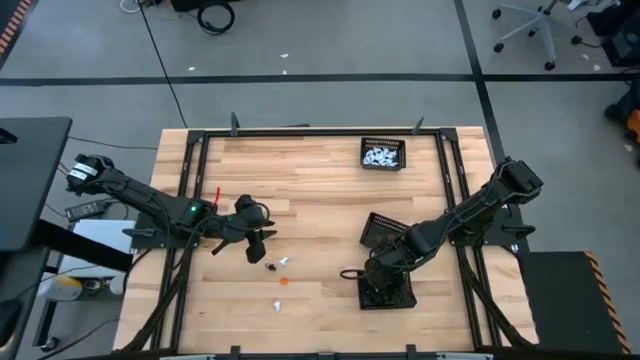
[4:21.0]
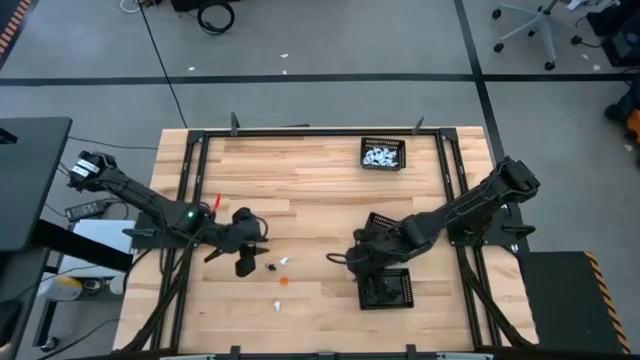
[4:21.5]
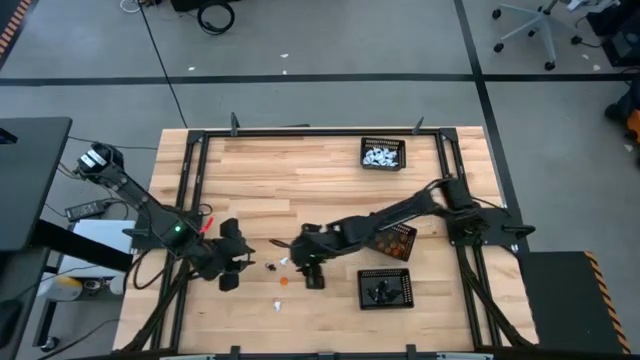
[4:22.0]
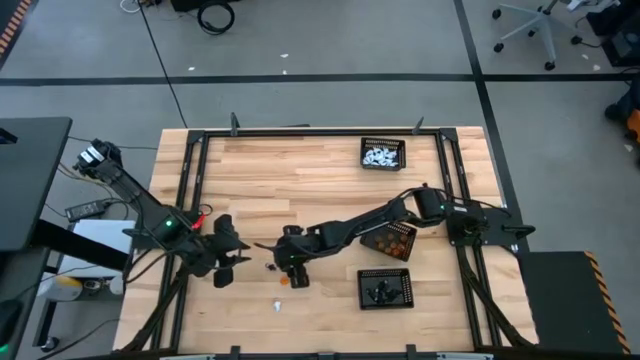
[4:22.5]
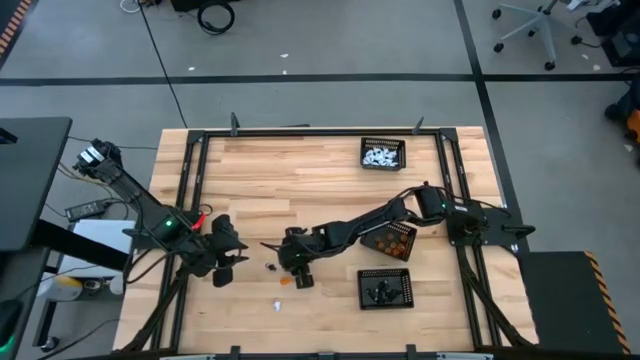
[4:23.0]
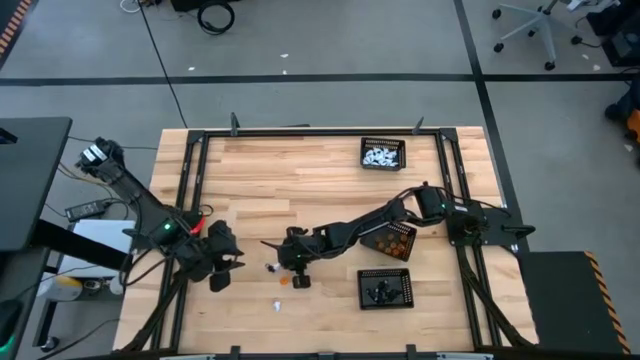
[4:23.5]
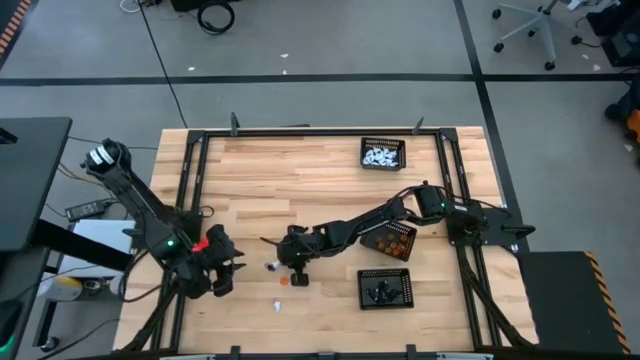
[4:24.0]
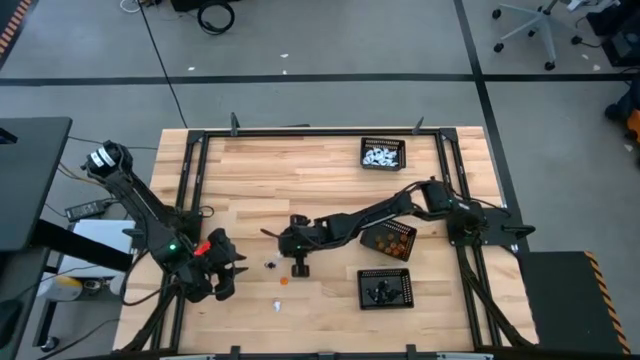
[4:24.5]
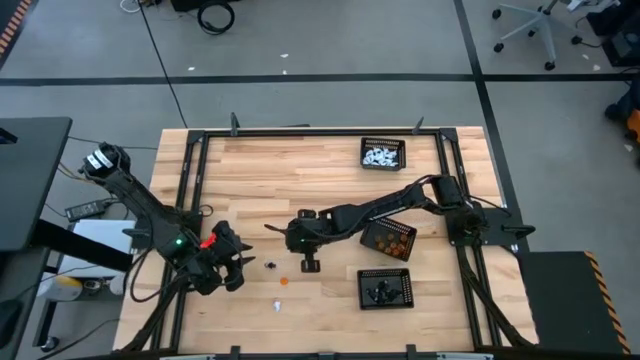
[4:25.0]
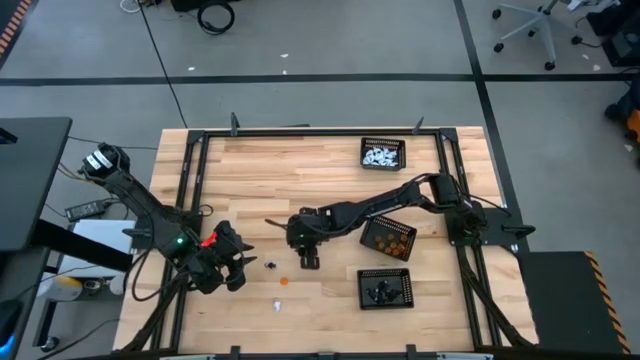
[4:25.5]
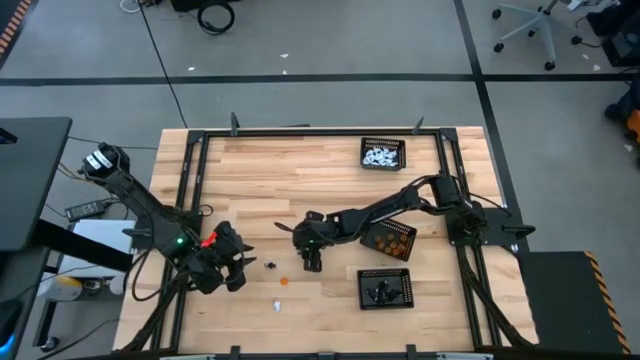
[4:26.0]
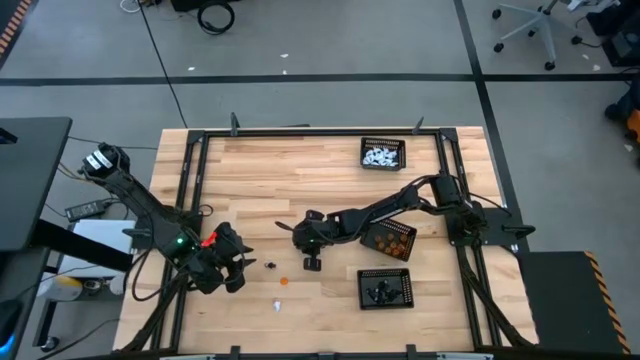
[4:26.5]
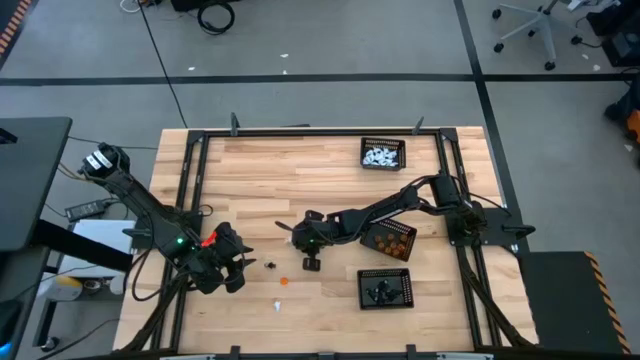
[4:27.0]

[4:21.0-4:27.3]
Task: Sort Halloween decoration
Put the white ghost toy into the top black bin

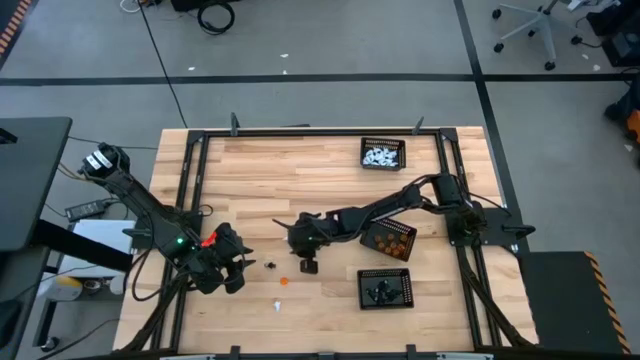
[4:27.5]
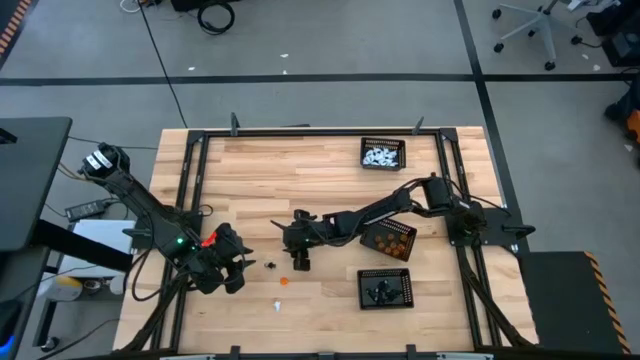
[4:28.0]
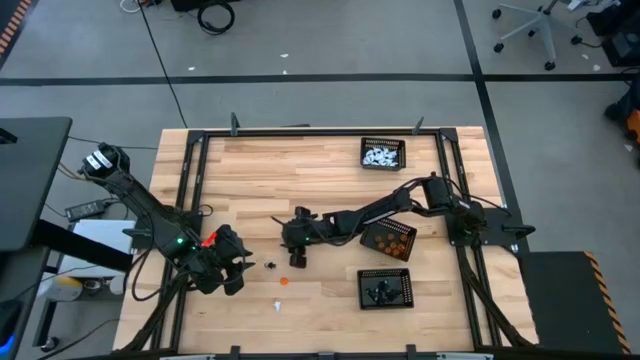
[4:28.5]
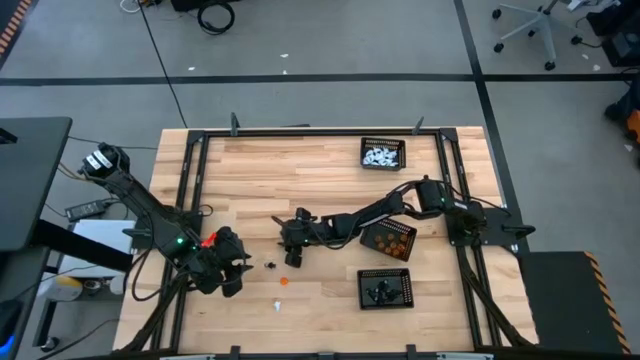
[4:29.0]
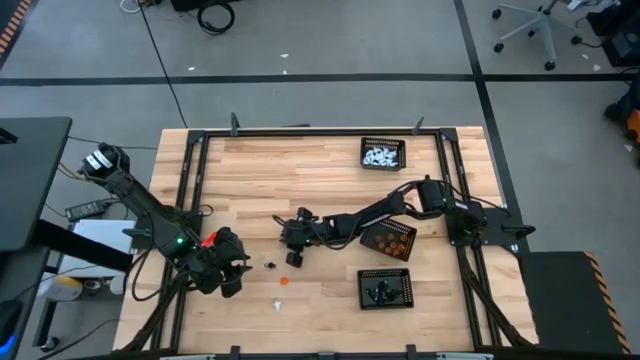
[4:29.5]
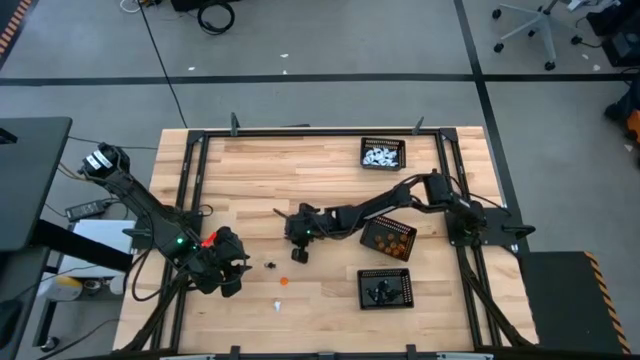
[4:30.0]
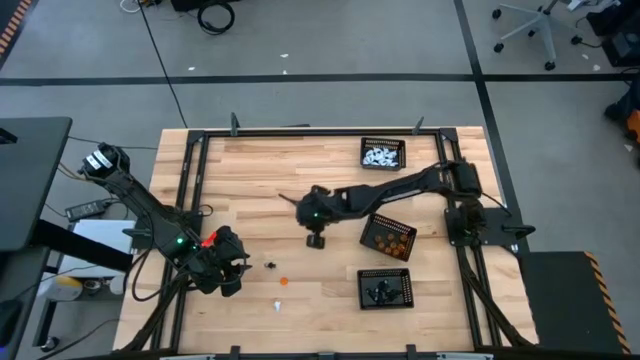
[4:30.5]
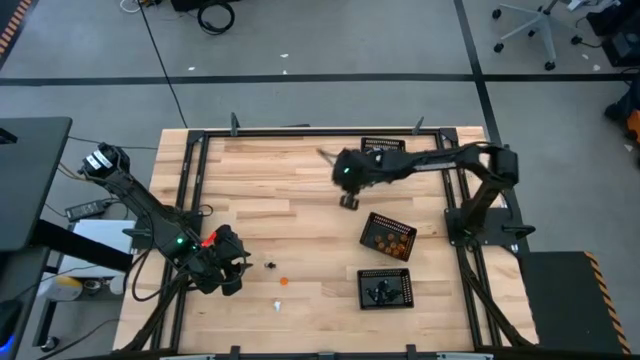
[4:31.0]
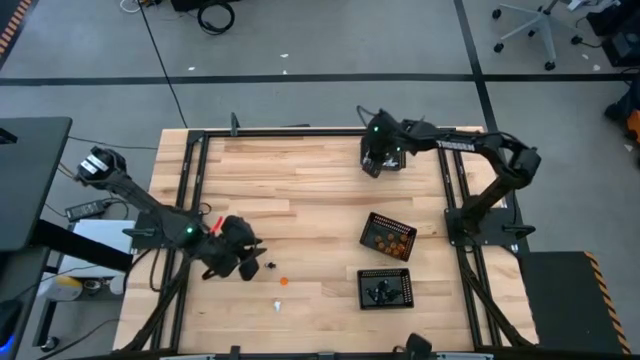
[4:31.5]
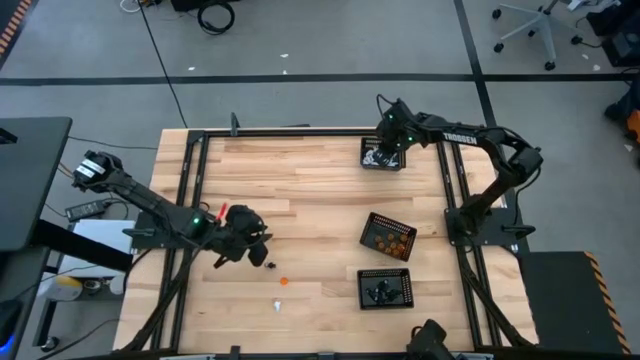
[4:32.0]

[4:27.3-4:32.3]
Put the white ghost toy into the top black bin

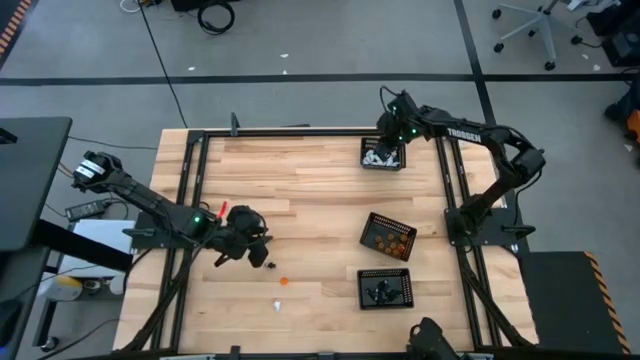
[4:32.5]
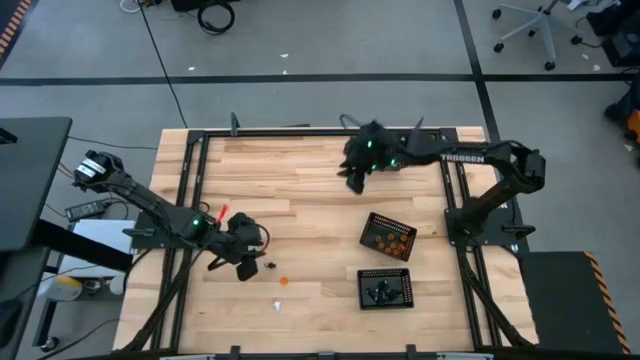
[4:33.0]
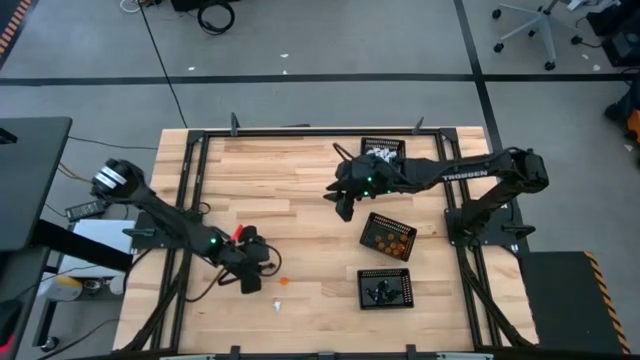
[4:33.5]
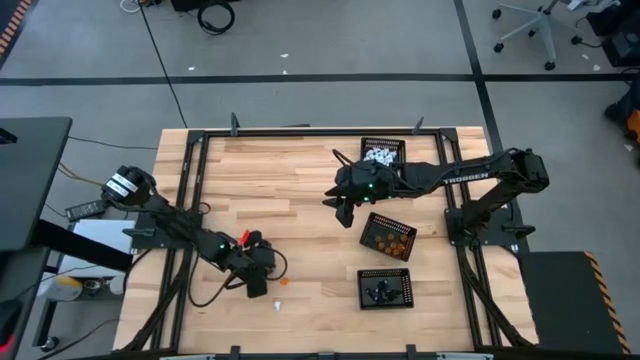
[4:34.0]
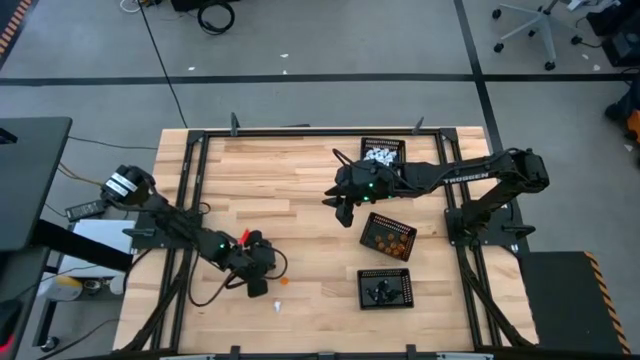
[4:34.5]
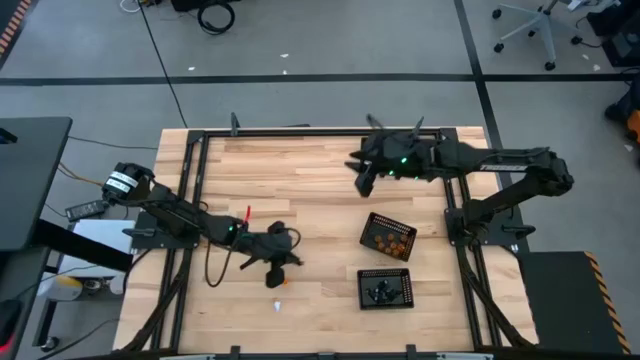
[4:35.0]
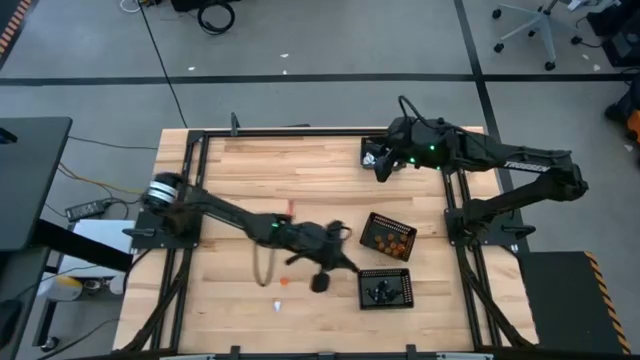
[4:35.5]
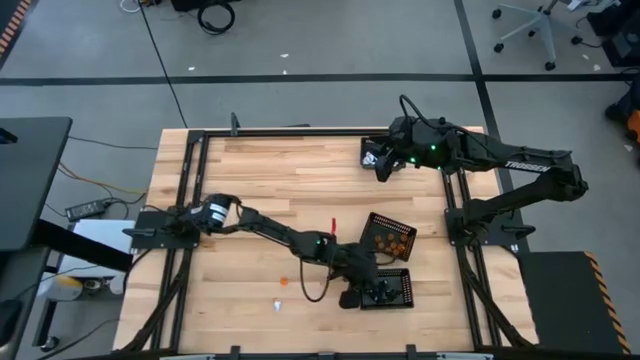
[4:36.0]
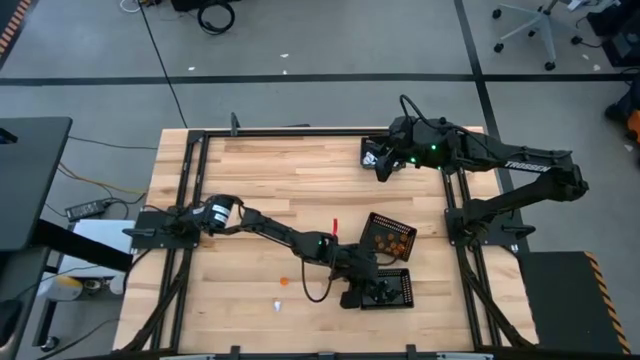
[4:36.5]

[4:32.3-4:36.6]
Put the black skeleton toy into the bottom black bin

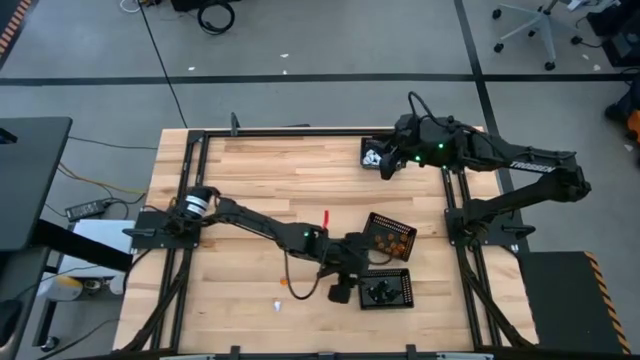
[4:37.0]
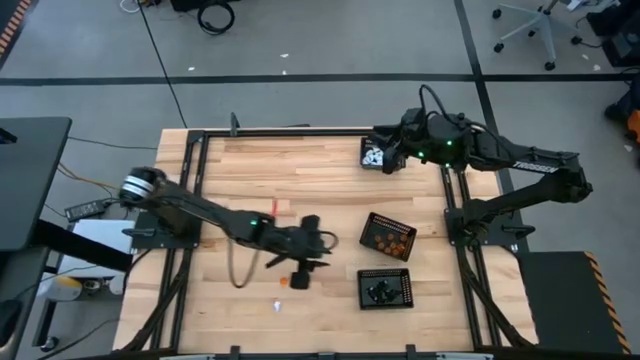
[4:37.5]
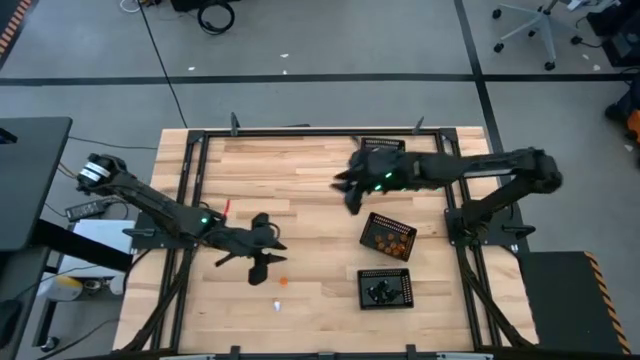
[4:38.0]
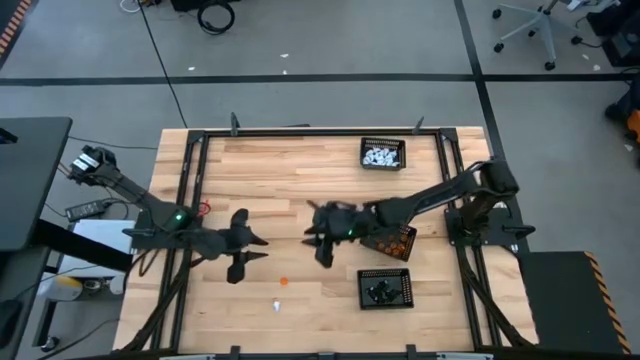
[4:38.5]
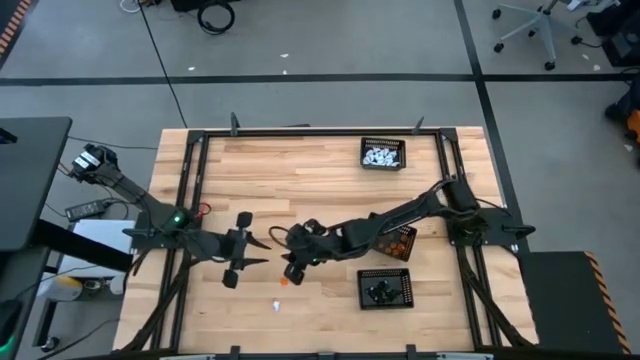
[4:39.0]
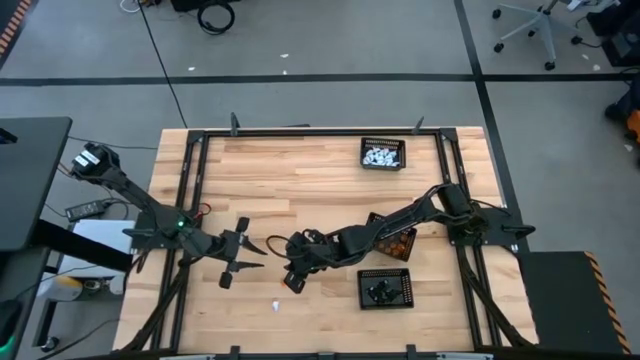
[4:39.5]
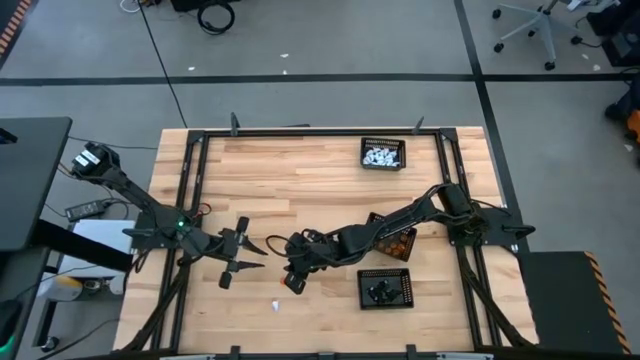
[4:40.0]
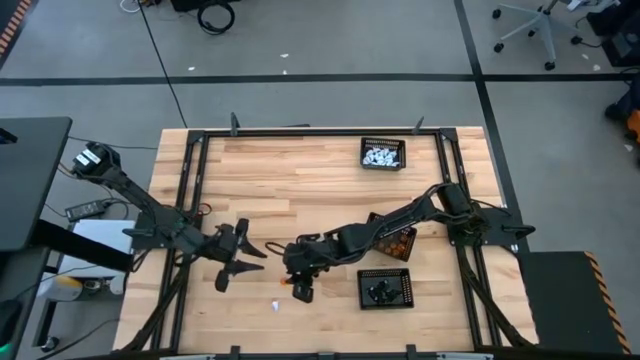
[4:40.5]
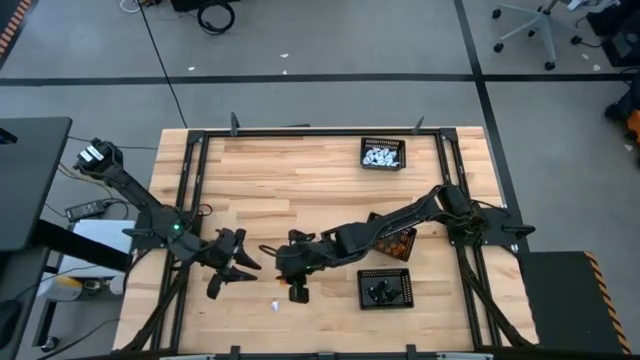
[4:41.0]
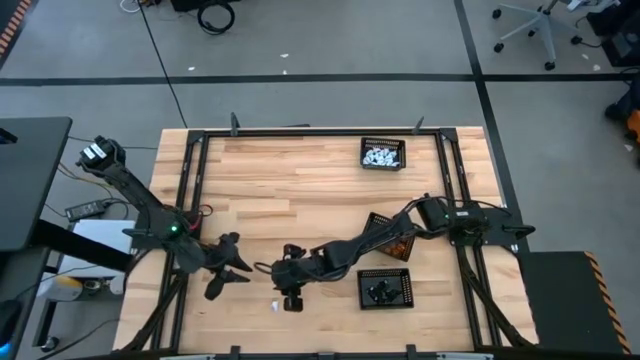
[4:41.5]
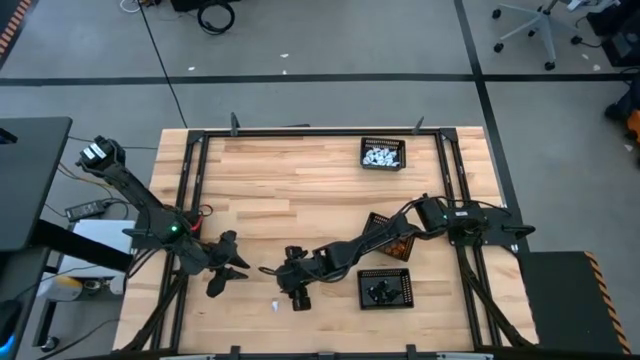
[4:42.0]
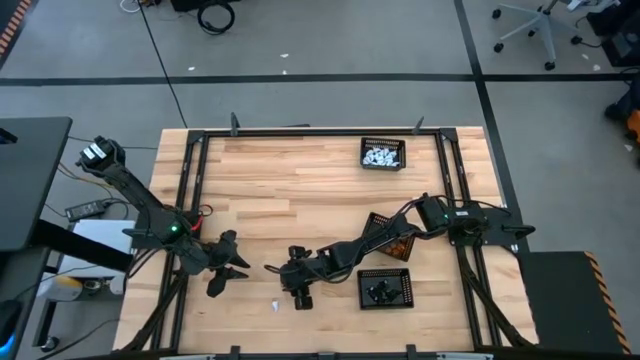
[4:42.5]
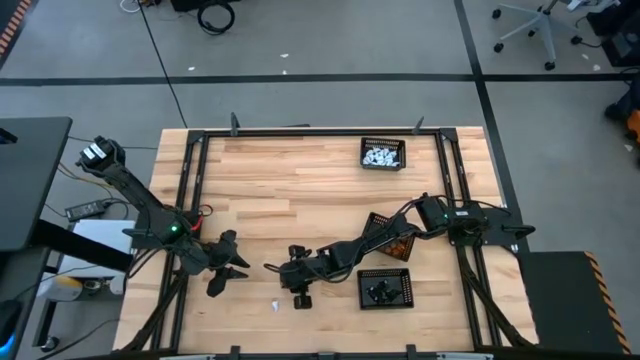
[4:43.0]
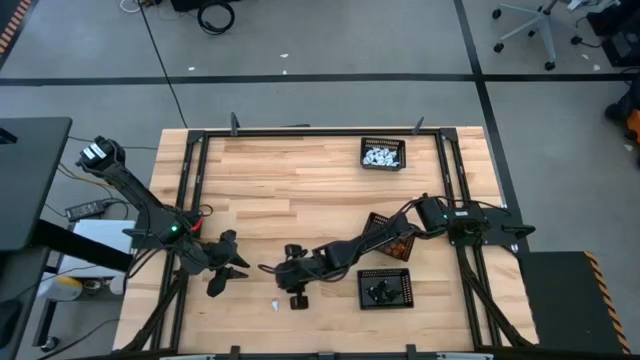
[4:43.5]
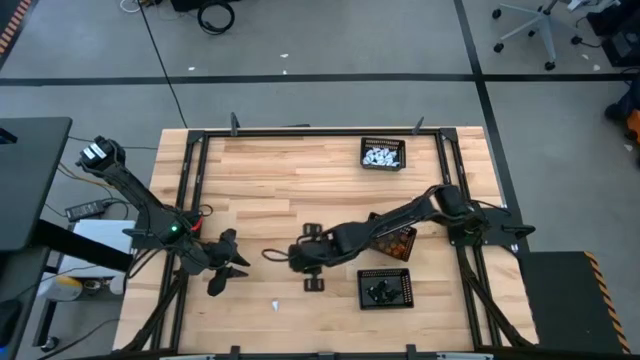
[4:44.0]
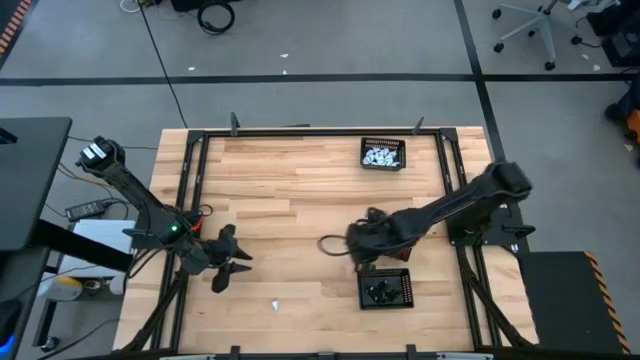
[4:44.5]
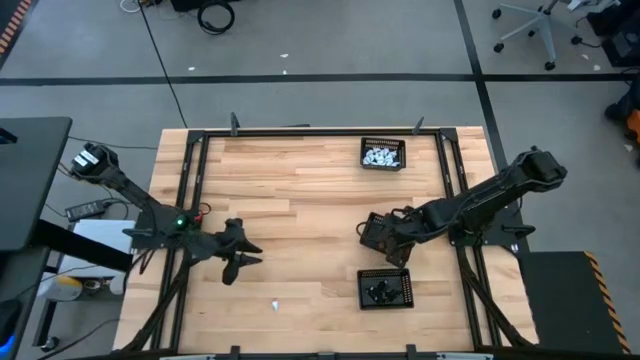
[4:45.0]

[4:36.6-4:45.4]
Put the orange pumpkin toy into the center black bin
